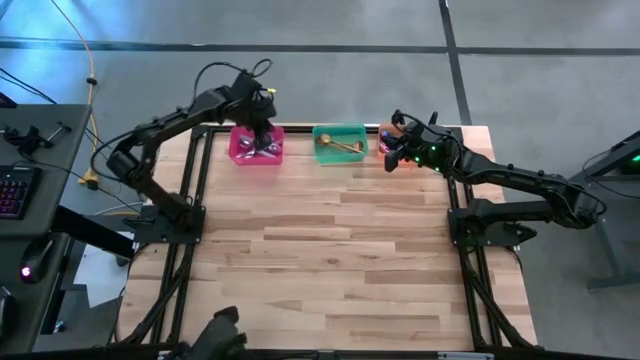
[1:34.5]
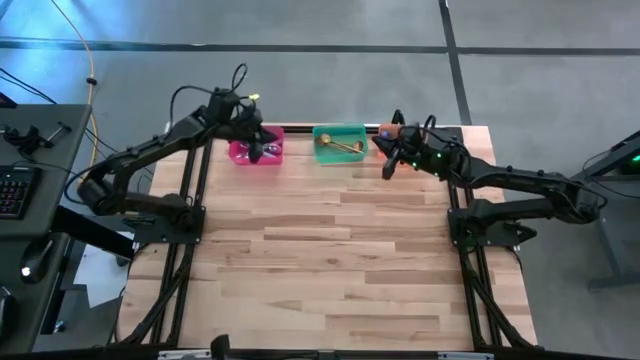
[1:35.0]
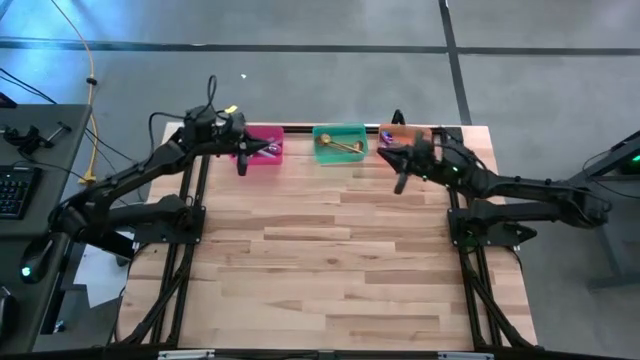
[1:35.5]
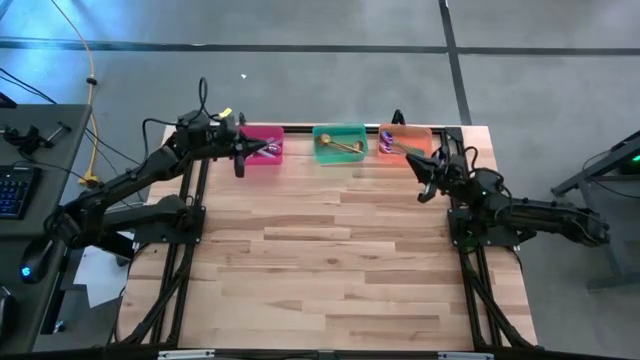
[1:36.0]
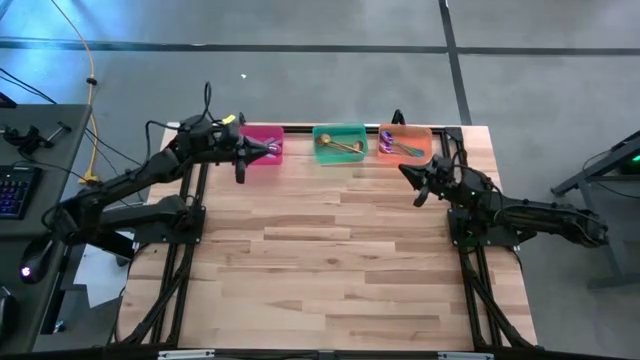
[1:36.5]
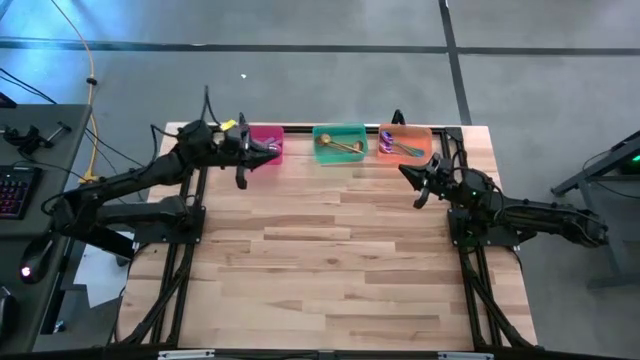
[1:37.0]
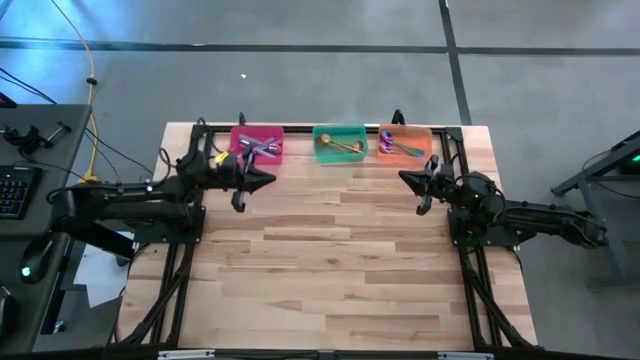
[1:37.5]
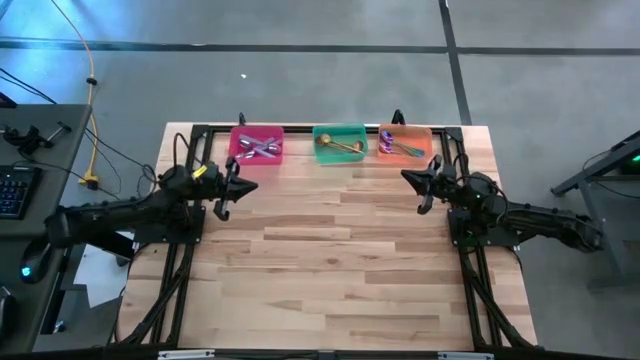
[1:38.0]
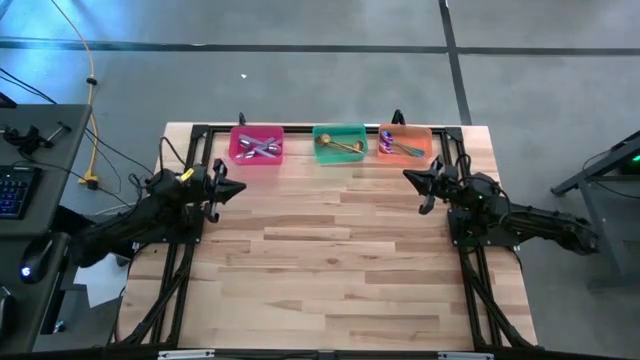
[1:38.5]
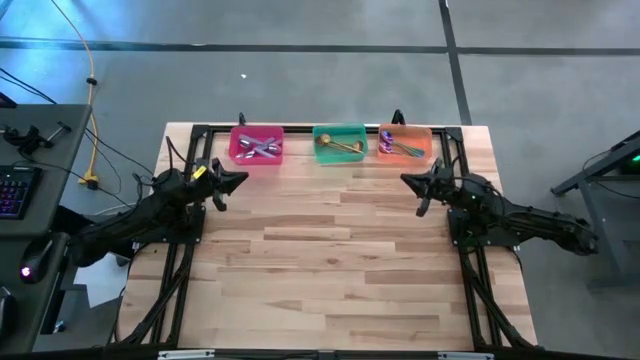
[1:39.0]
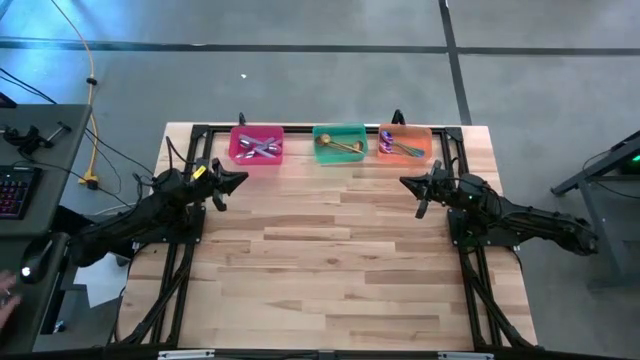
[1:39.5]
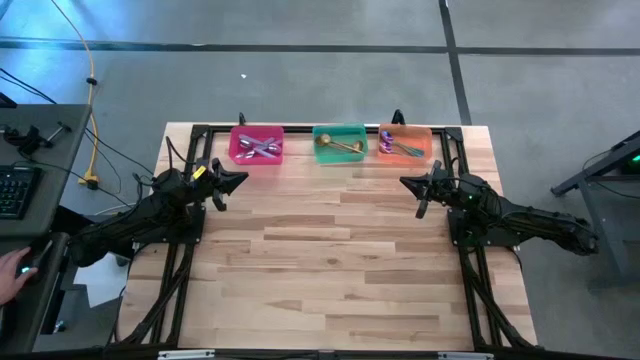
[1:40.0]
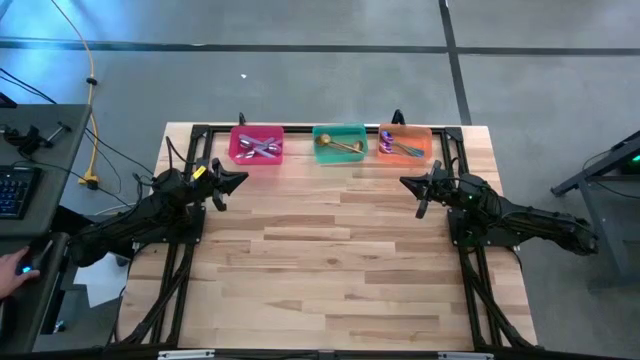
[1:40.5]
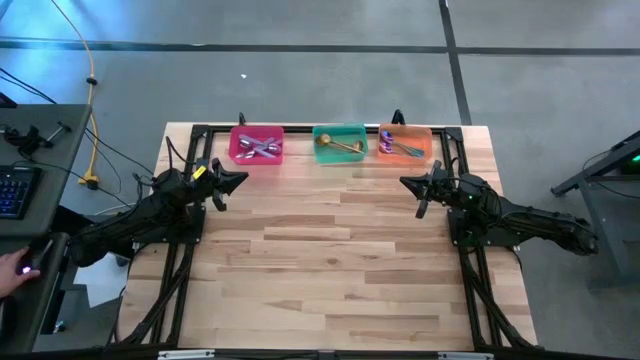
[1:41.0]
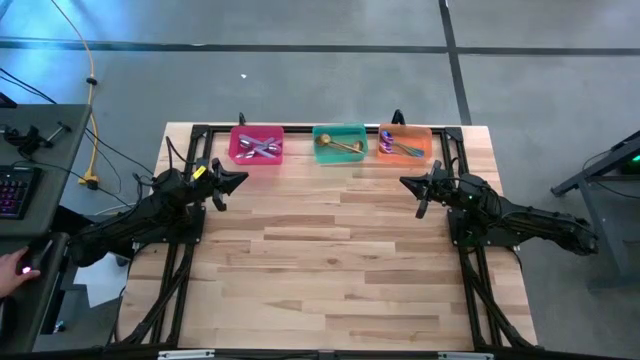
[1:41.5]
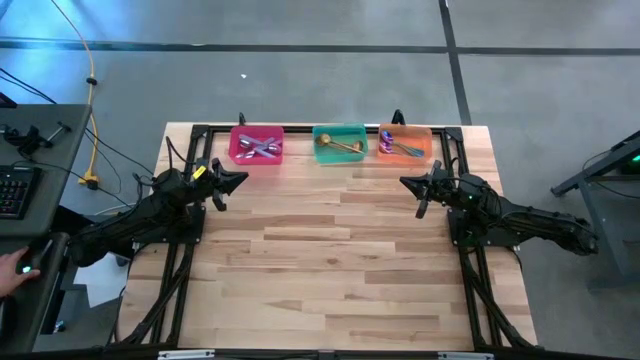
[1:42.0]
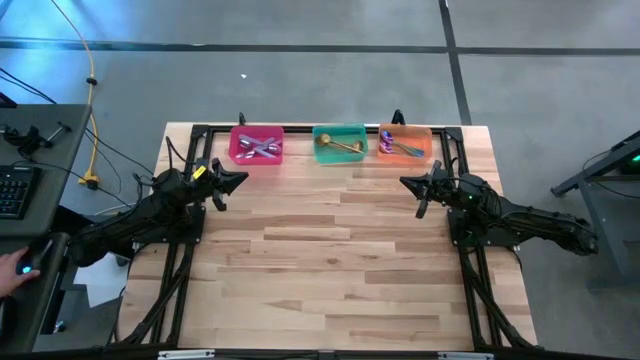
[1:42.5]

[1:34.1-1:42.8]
Task: Sort silverware by color (type)
Return to Home Position

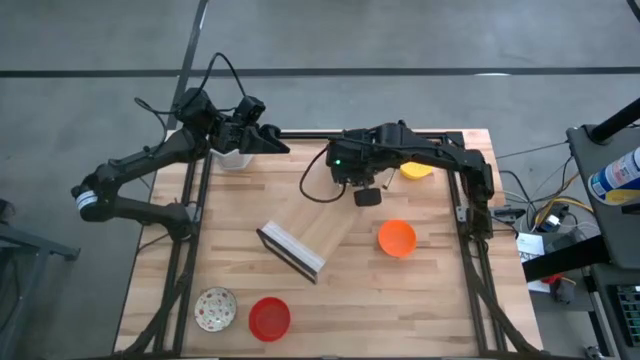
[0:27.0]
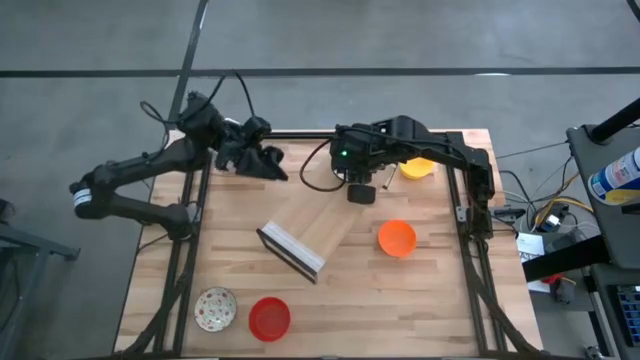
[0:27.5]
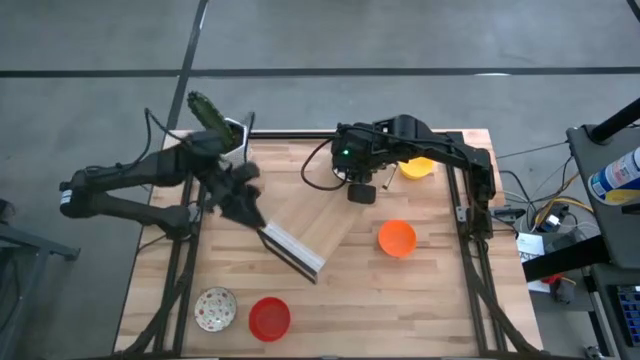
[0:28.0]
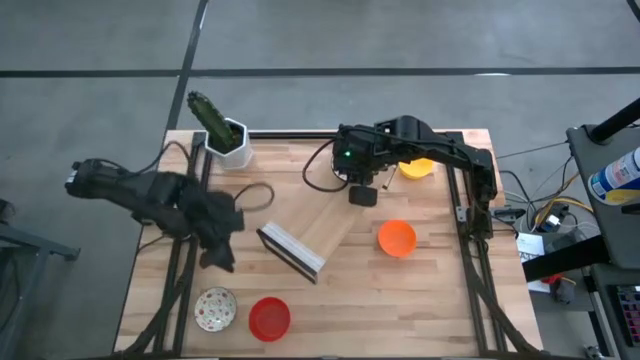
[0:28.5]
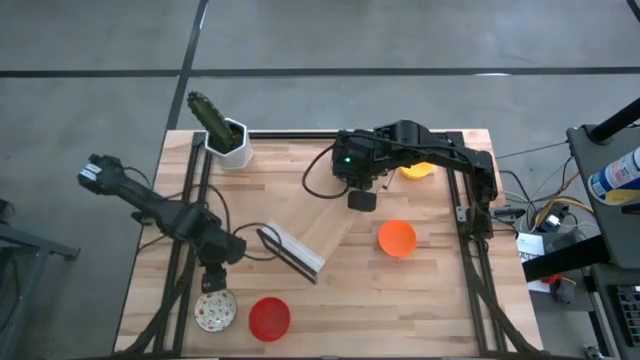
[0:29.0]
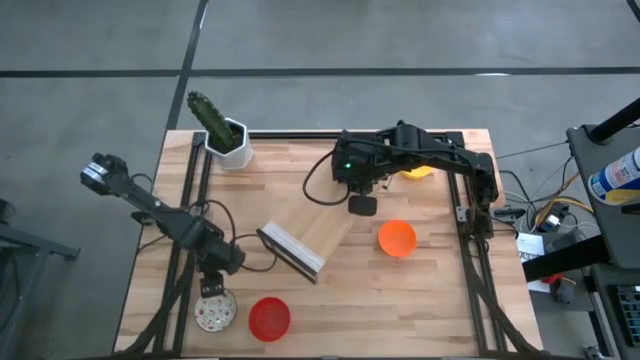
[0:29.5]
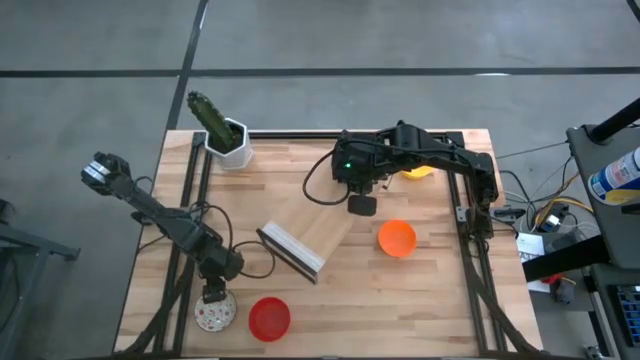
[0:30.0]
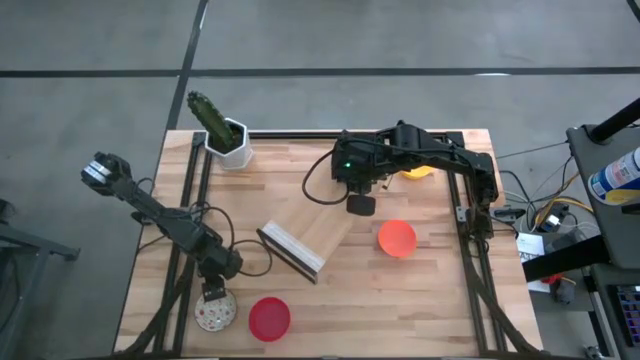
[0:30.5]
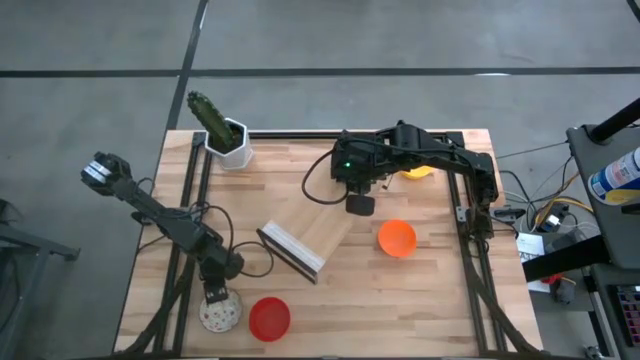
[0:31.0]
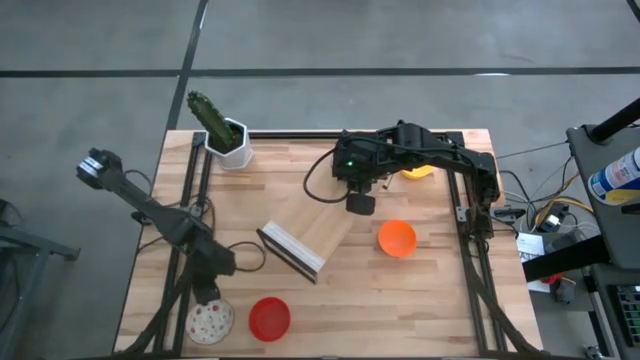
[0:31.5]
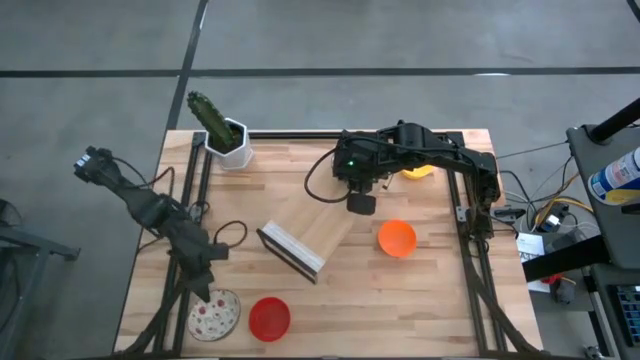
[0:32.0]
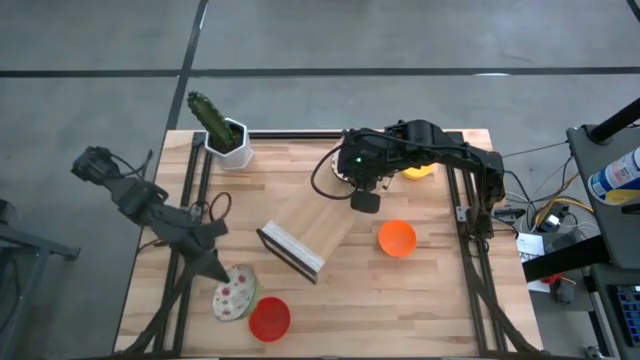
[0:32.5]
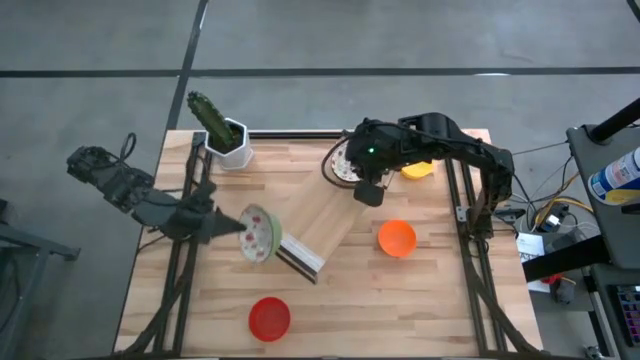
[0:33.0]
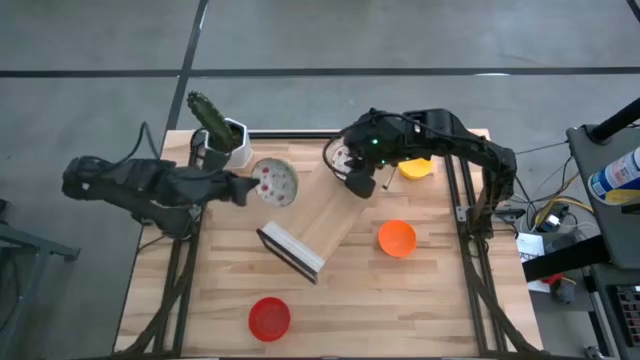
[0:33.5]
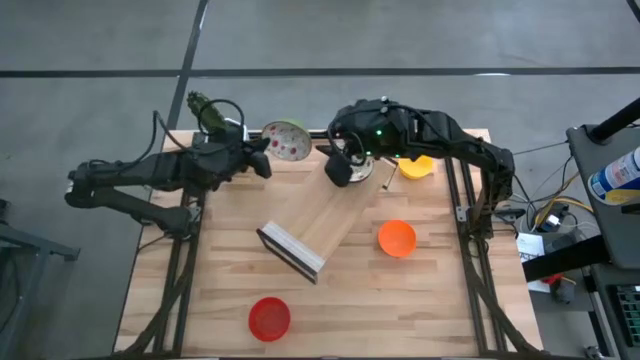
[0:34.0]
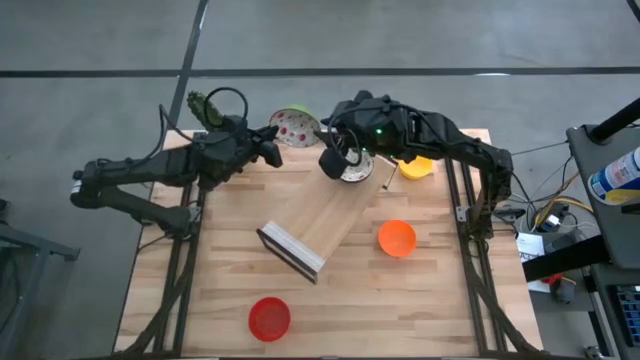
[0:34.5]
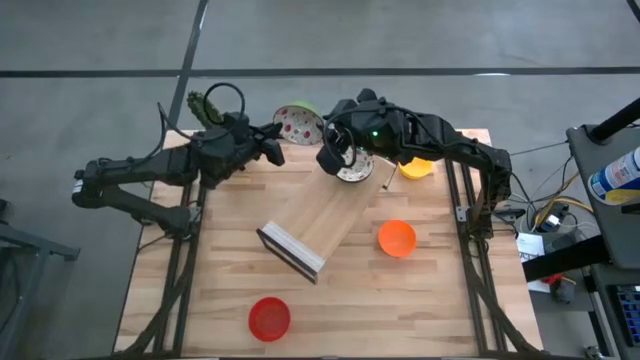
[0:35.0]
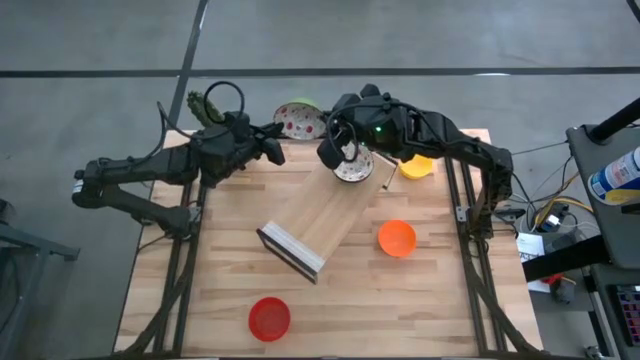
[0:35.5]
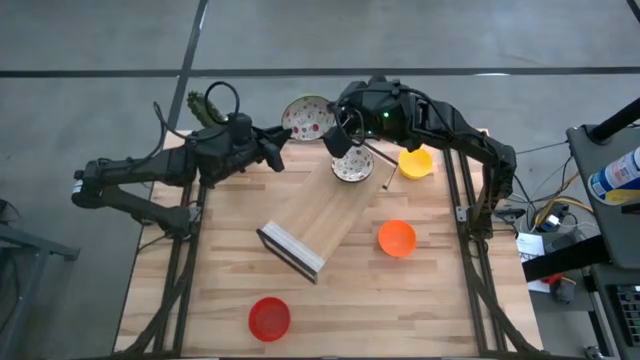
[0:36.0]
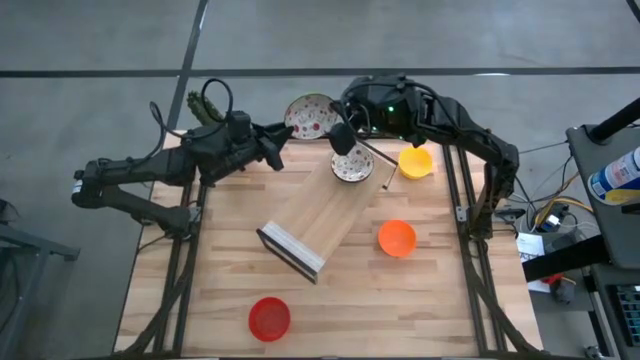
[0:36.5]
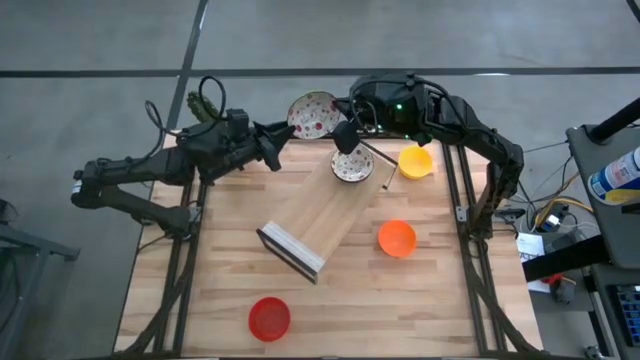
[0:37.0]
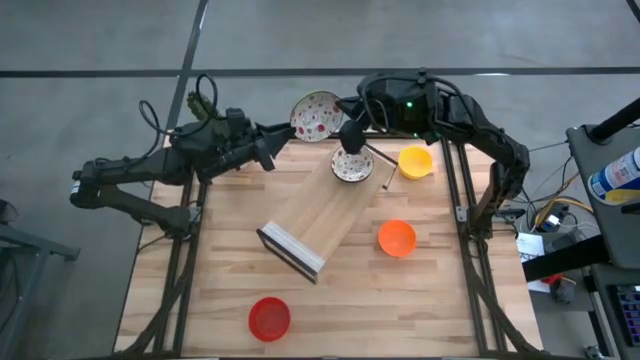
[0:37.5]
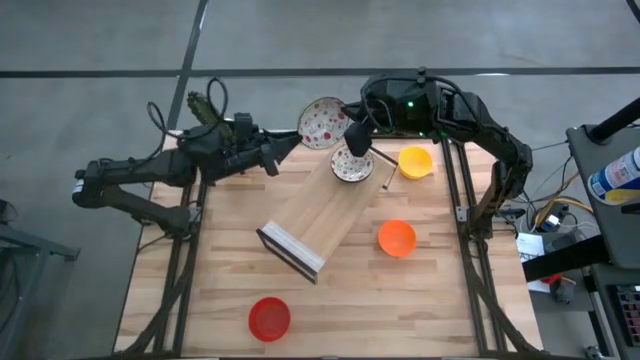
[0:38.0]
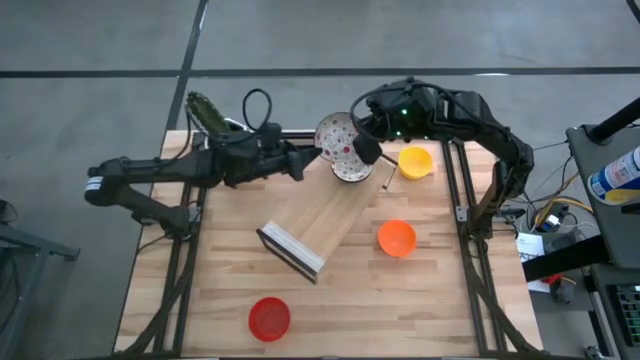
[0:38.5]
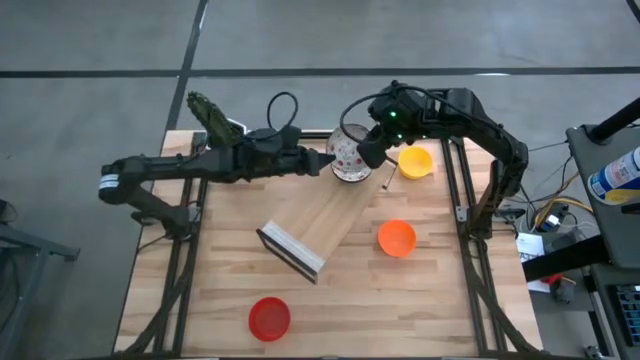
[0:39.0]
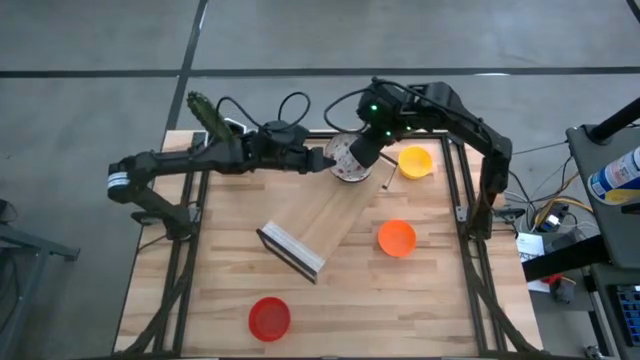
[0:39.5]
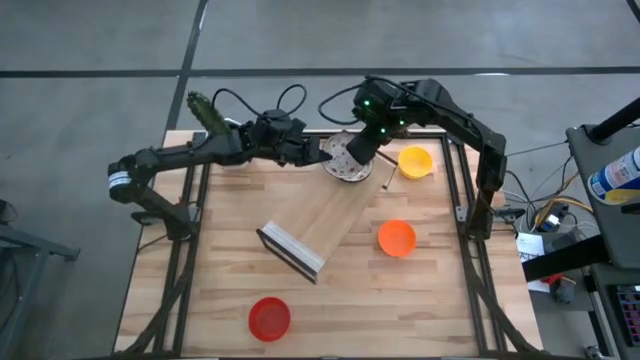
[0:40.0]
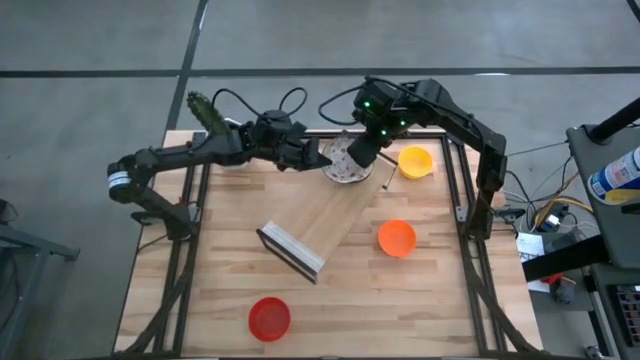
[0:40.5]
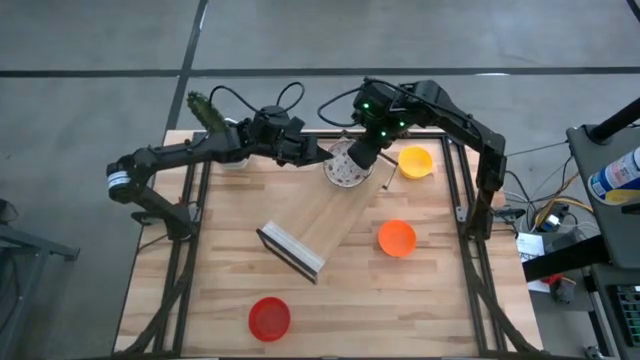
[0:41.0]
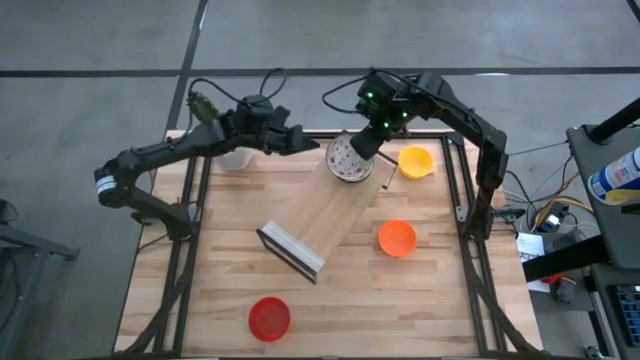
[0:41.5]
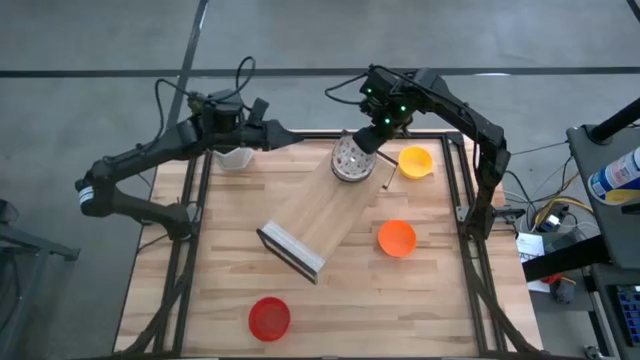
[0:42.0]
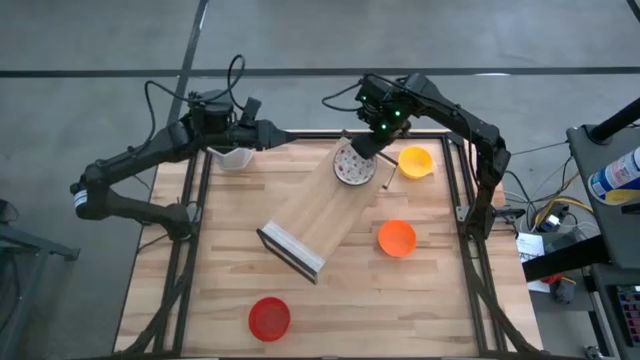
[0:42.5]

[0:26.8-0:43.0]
Task: Pick & Place Mini bowls
Stack the white bowl on the top of the white bowl on the shelf
